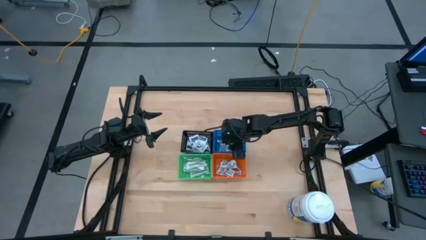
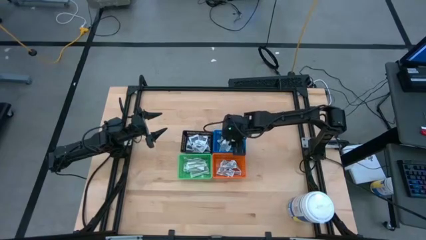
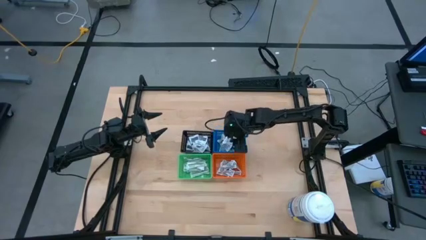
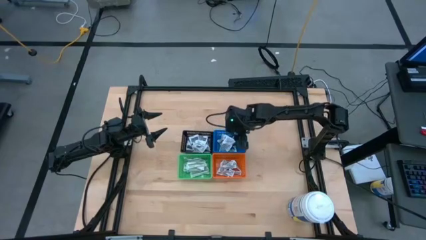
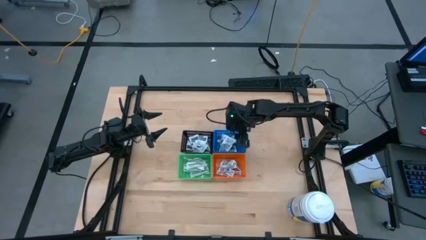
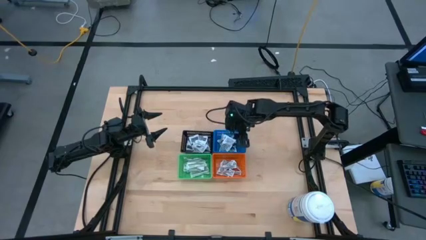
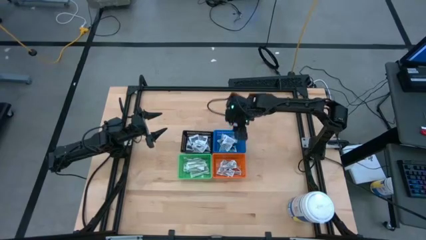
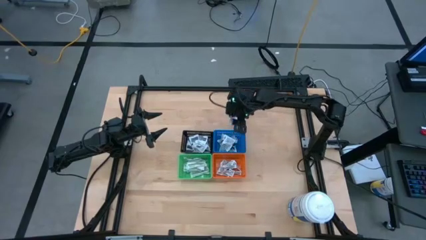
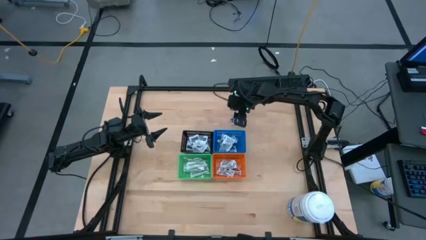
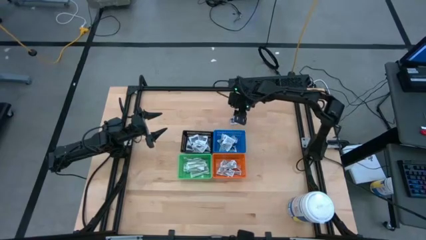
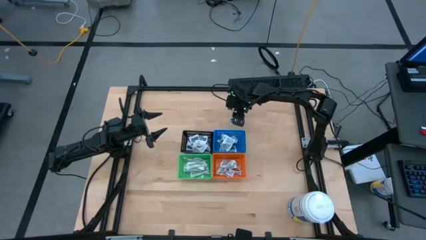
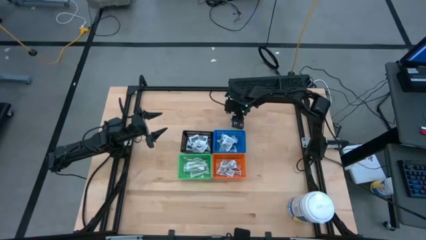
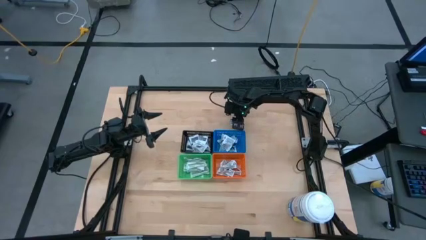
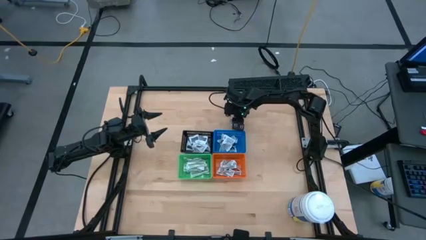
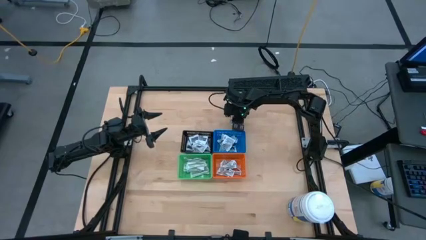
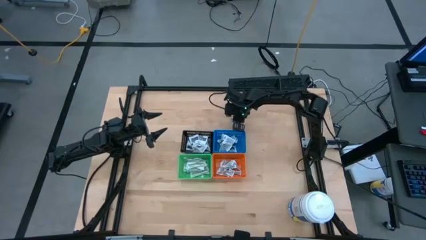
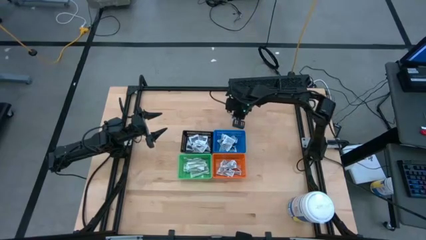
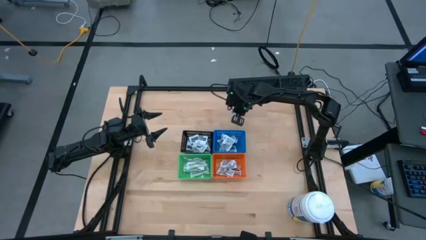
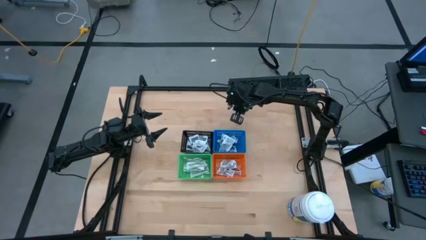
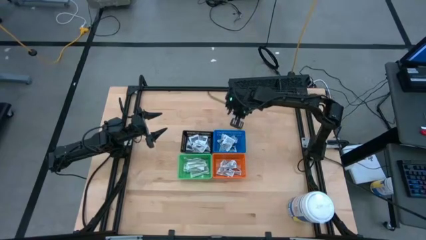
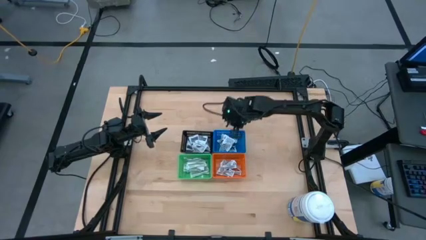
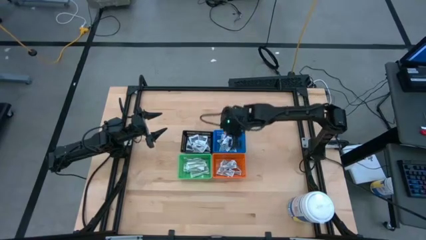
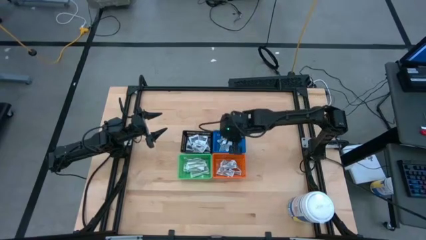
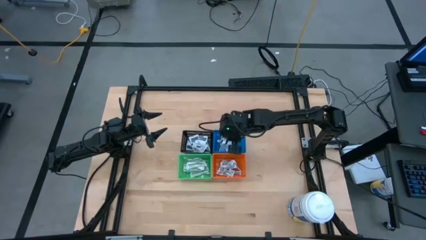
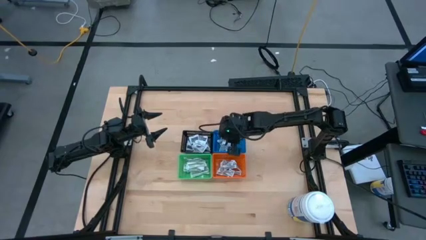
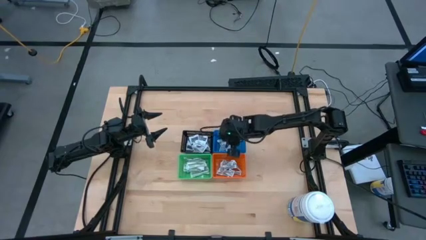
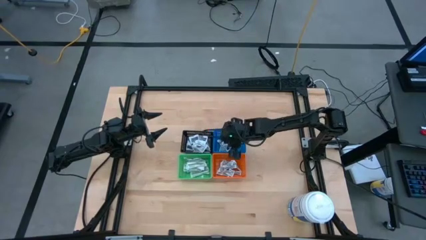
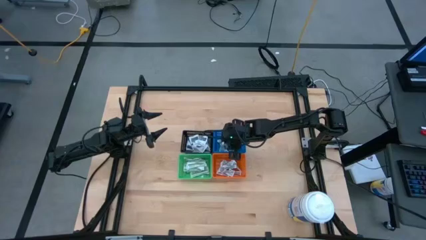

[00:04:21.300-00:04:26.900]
Task: Pick & Place First Aid Supplies
Put the alcohol pad into the blue bin

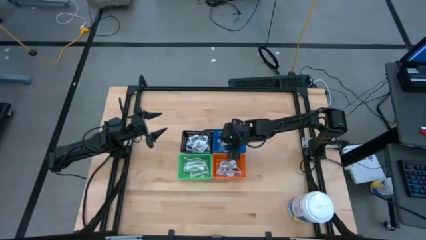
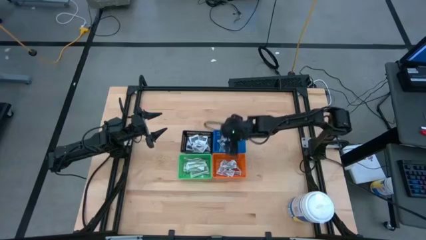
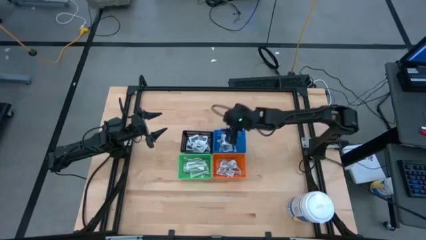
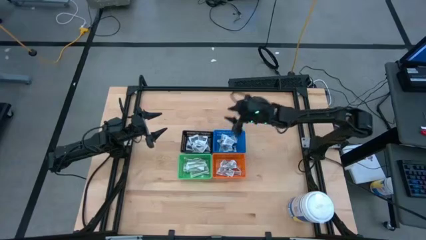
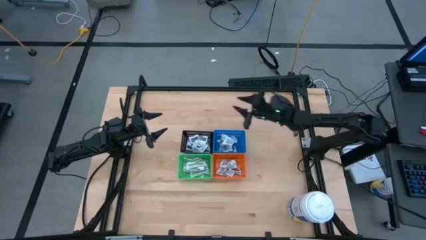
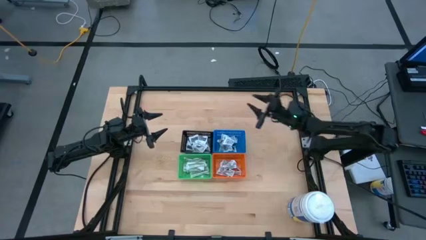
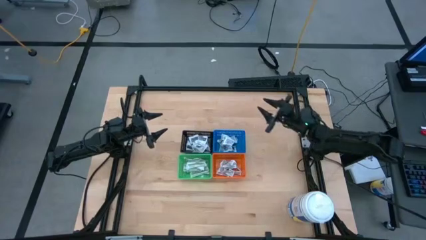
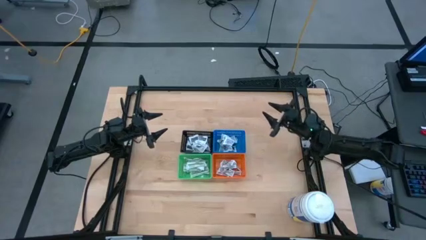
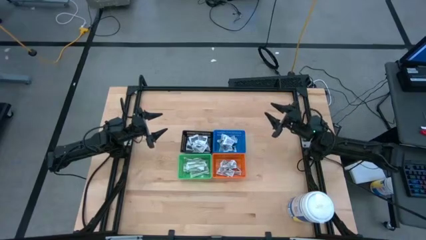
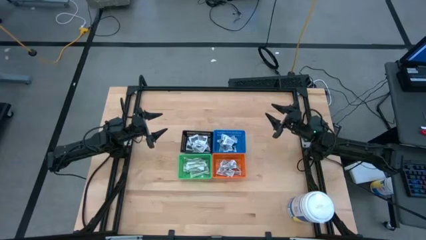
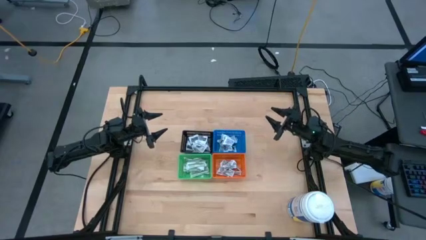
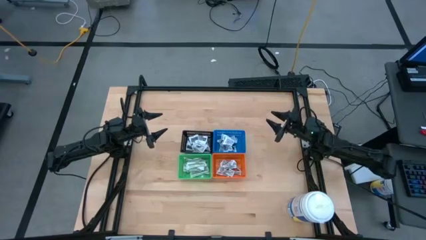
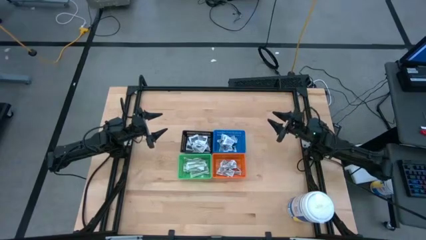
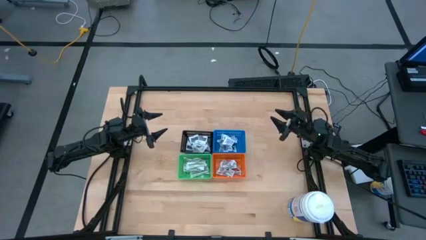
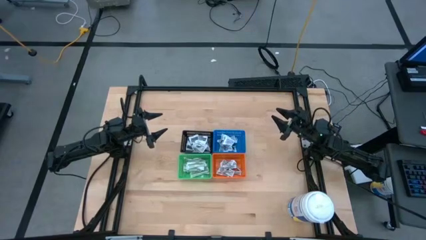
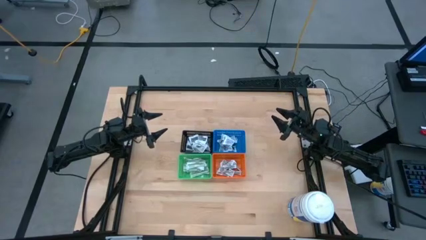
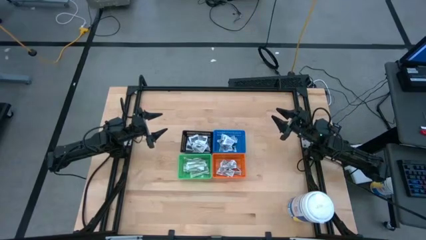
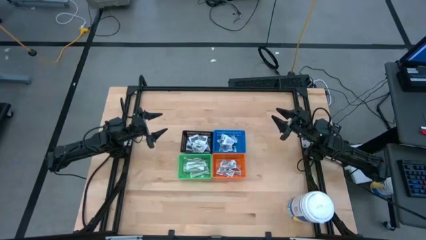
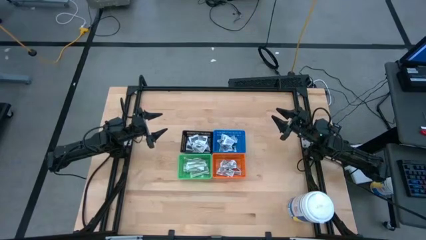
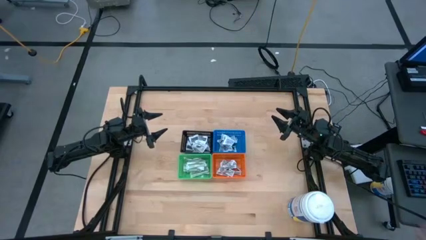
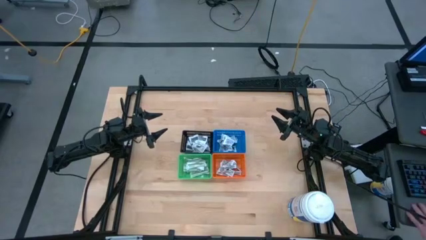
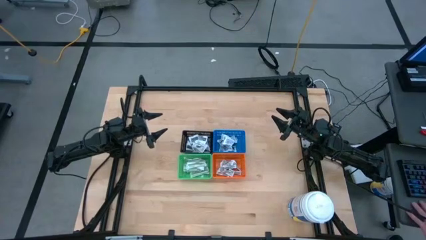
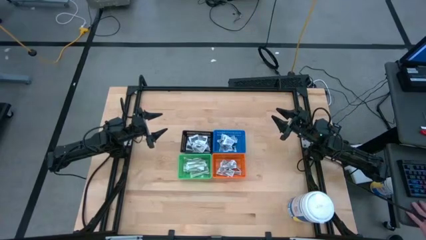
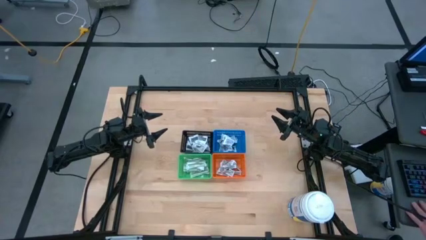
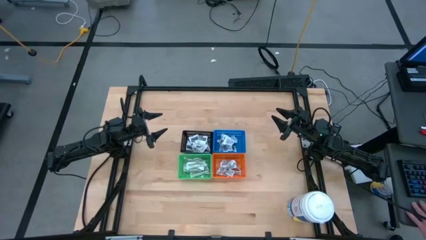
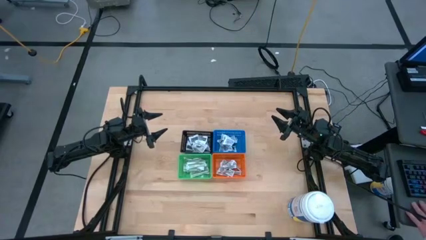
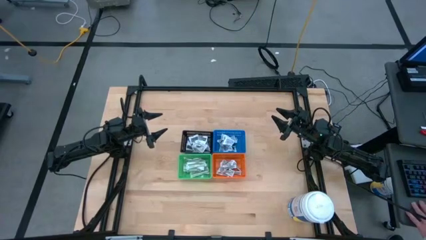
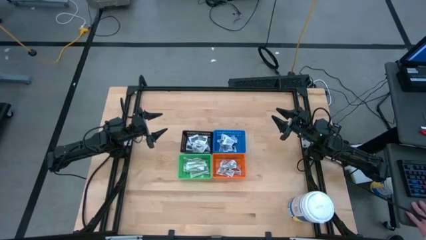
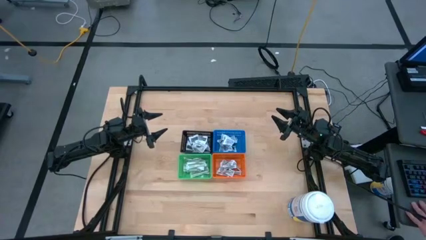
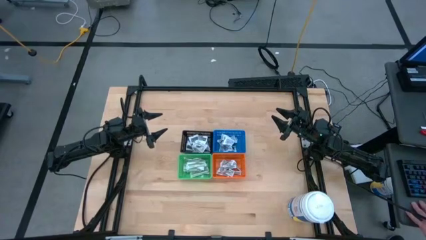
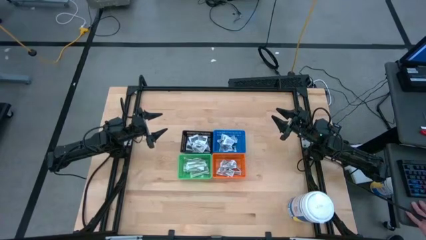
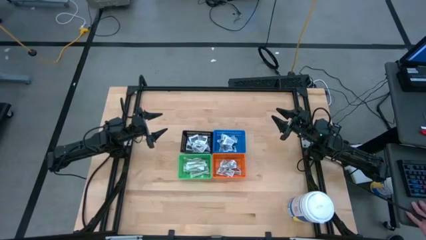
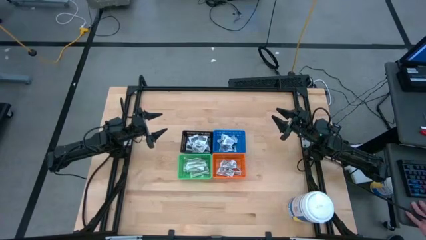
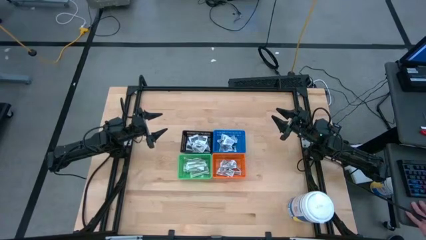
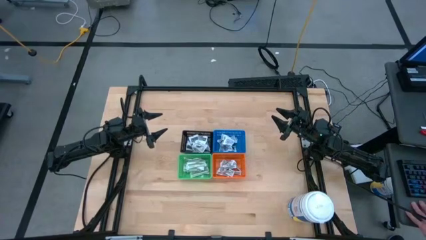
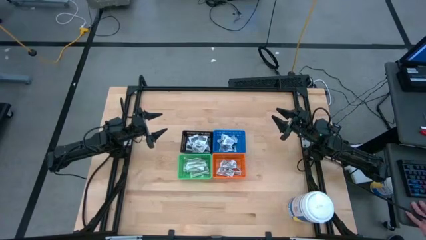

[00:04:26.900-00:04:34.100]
Return to Home Position

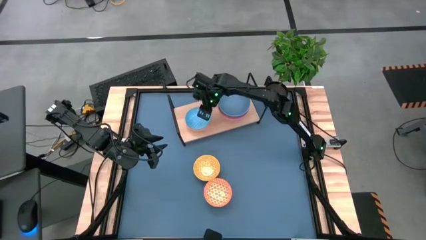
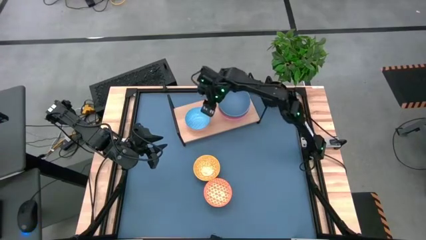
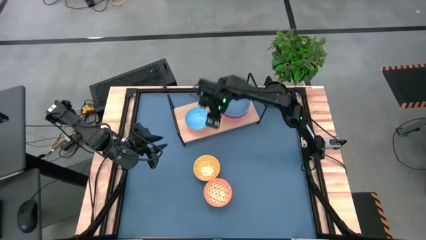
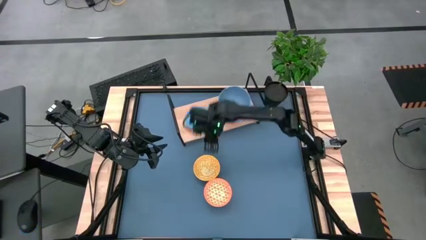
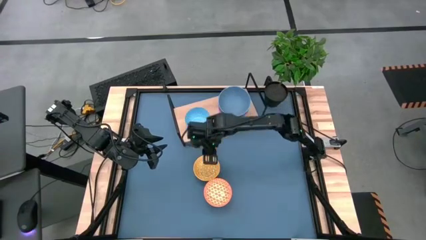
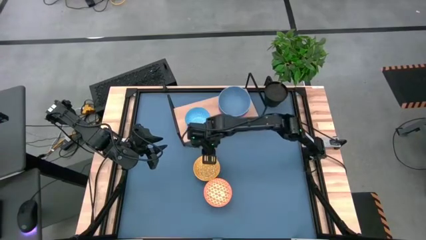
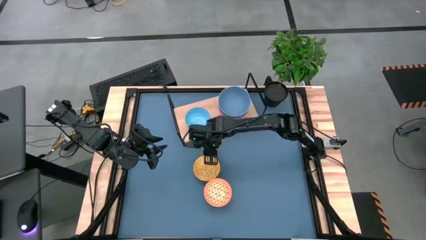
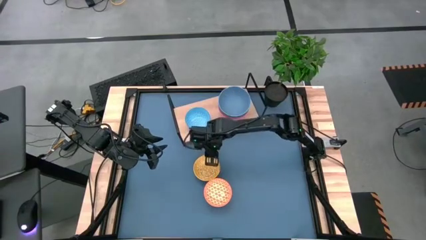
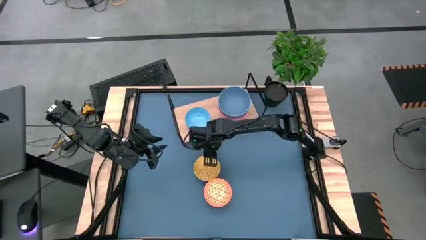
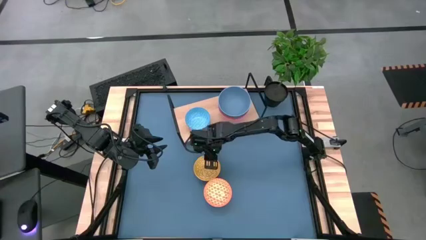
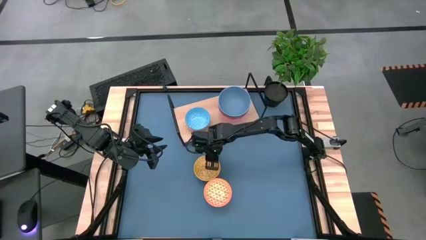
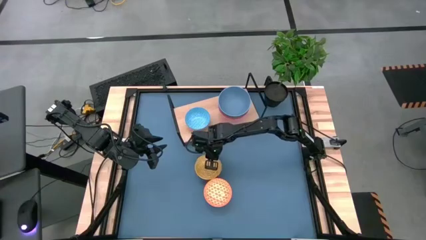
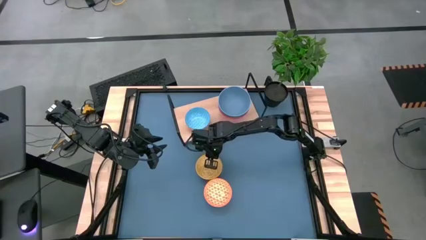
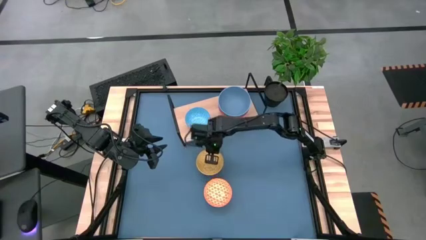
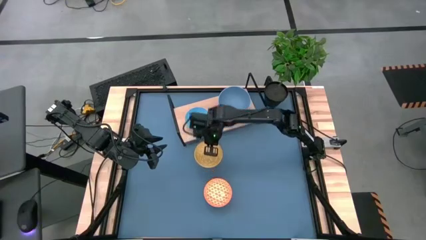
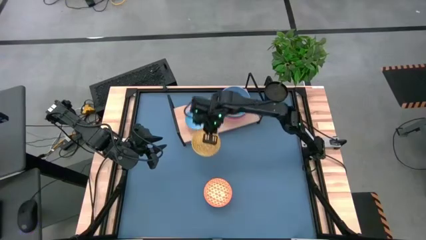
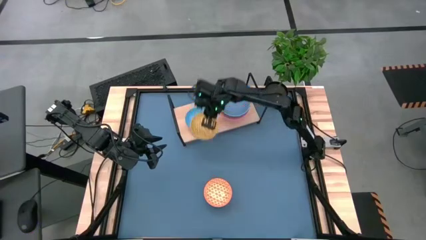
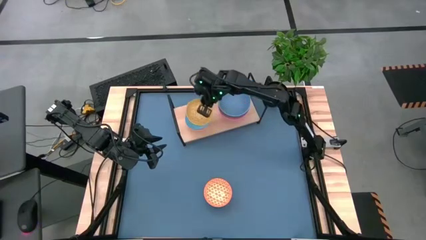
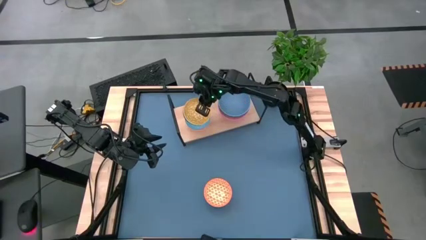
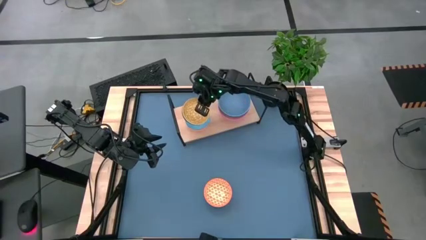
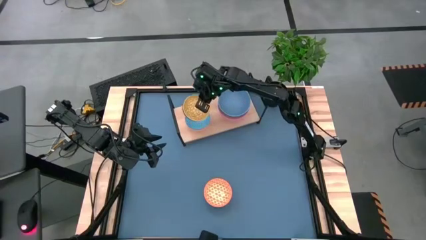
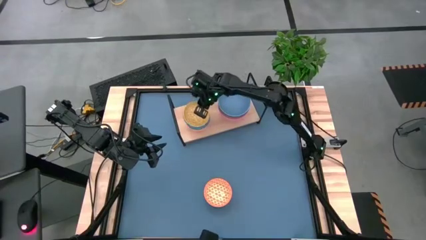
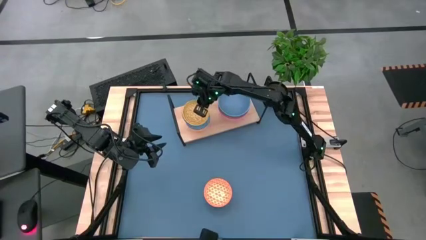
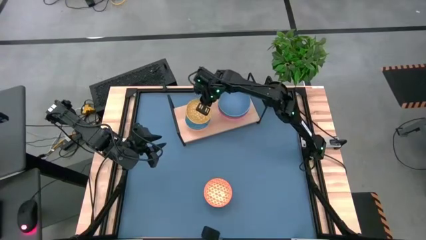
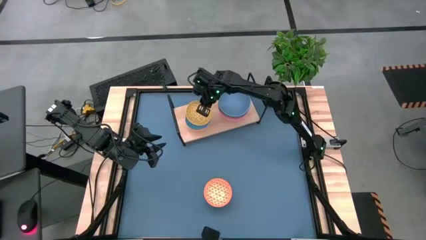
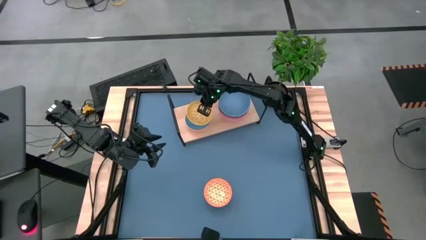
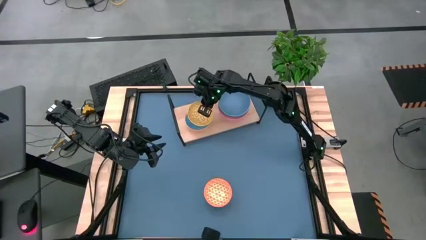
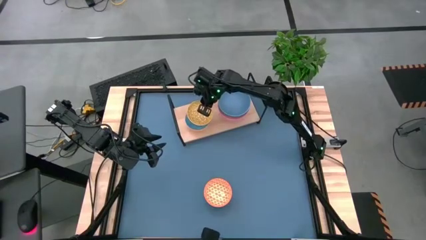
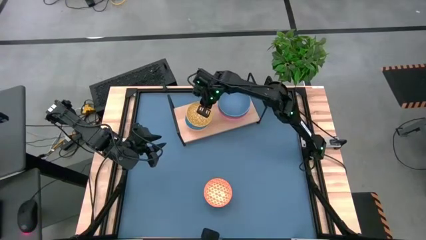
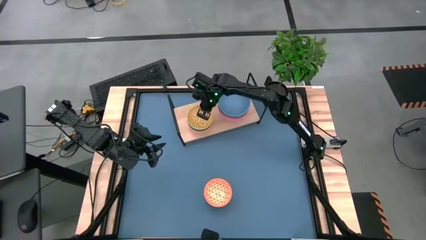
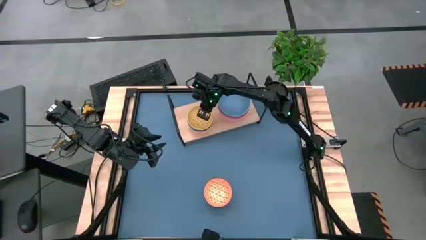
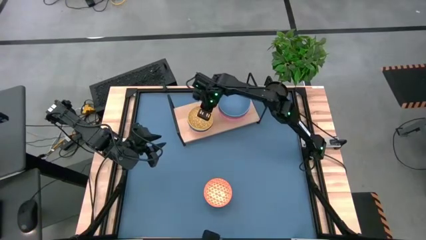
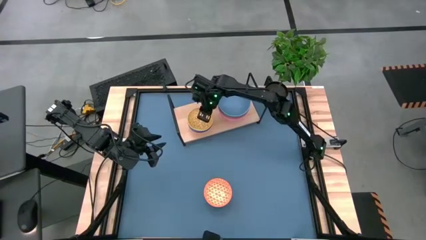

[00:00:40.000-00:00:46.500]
Task: Place and stack bowls onto a shelf
Stack the yellow bowl on top of the light blue bowl on the shelf
